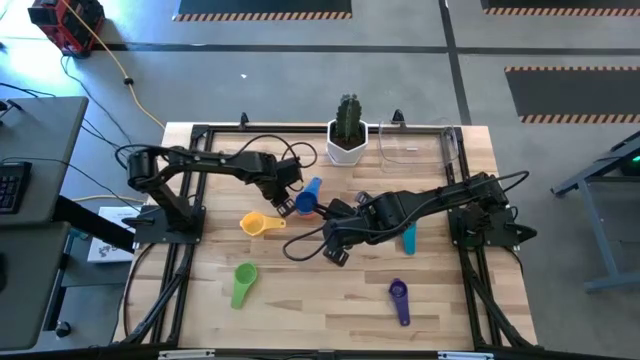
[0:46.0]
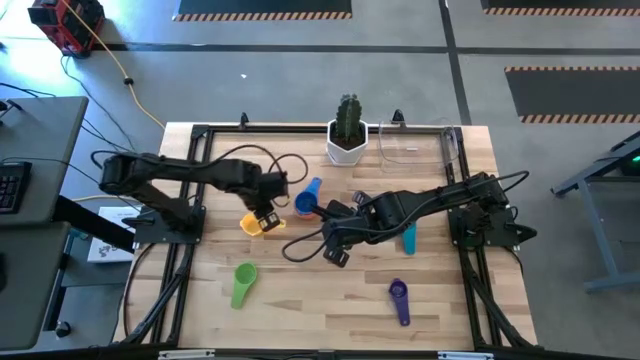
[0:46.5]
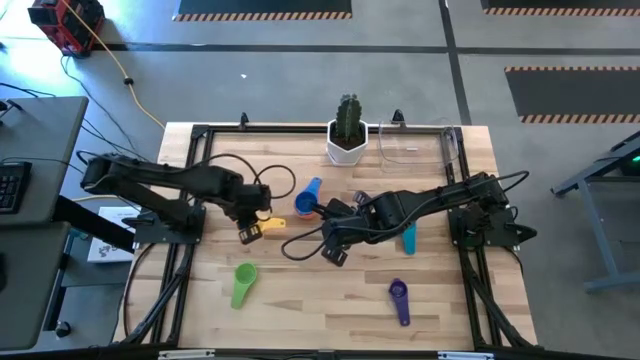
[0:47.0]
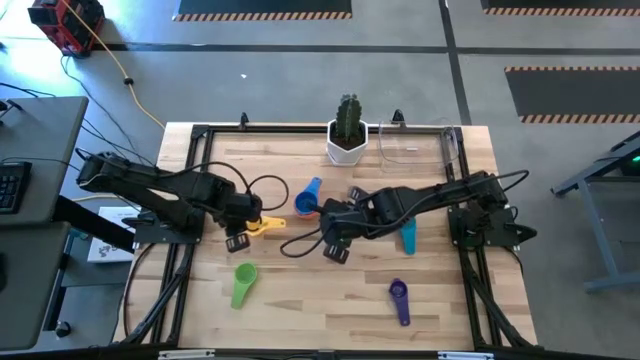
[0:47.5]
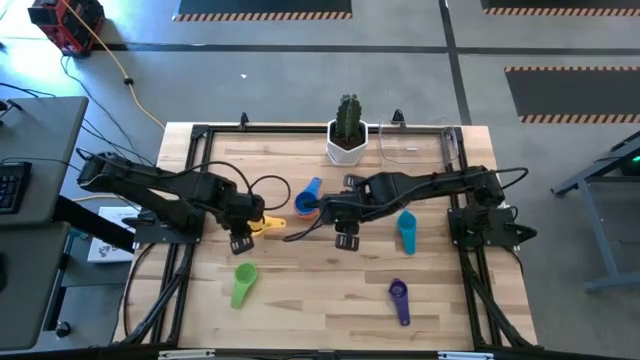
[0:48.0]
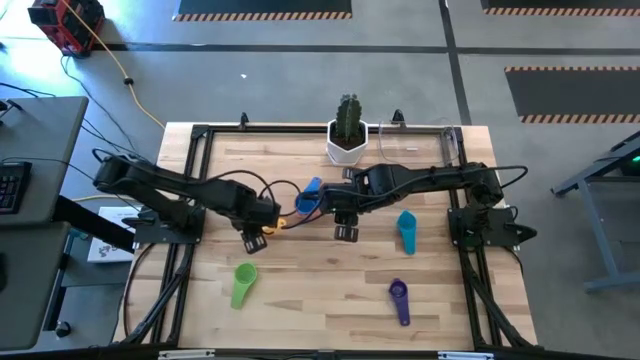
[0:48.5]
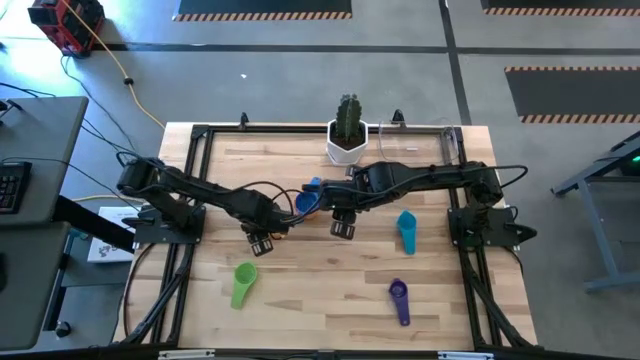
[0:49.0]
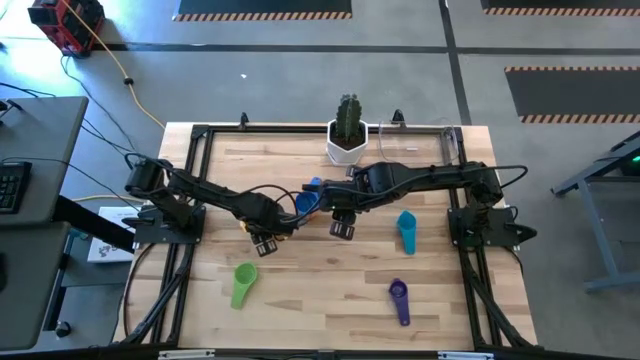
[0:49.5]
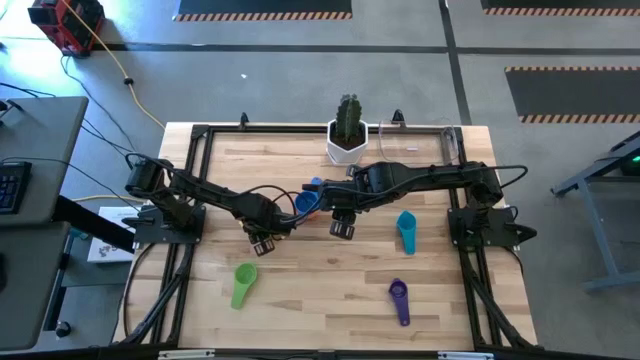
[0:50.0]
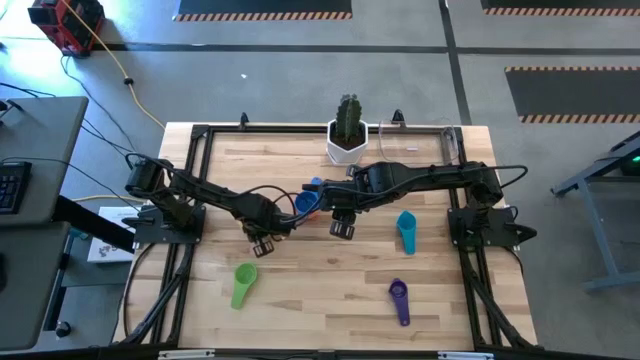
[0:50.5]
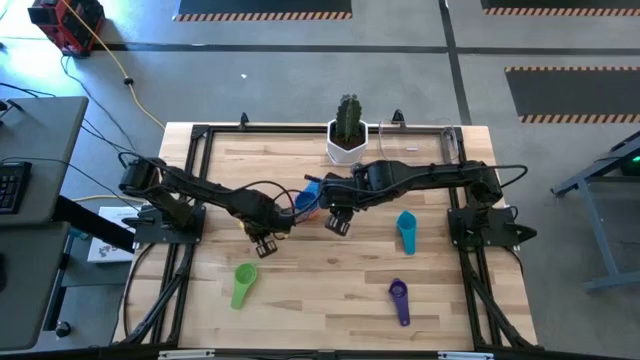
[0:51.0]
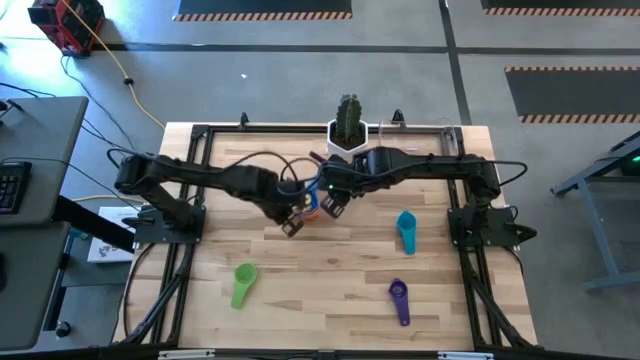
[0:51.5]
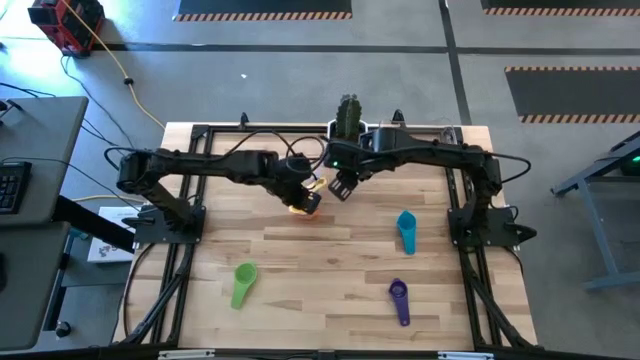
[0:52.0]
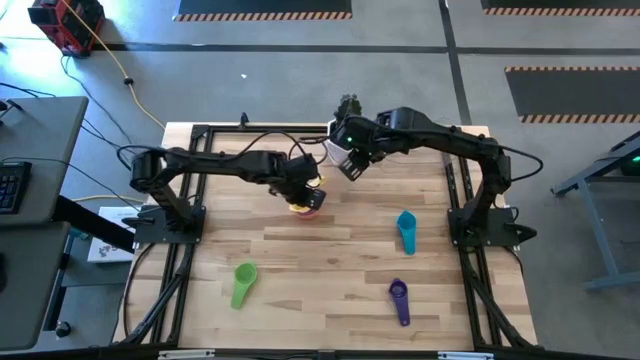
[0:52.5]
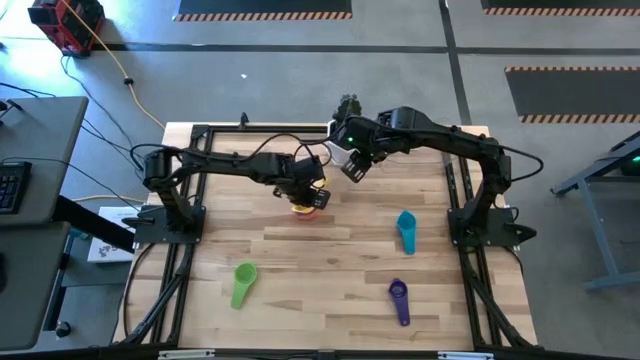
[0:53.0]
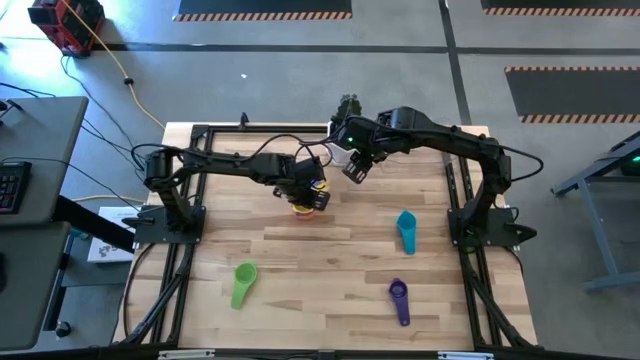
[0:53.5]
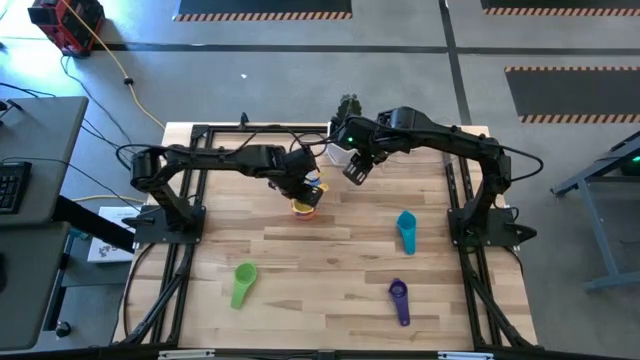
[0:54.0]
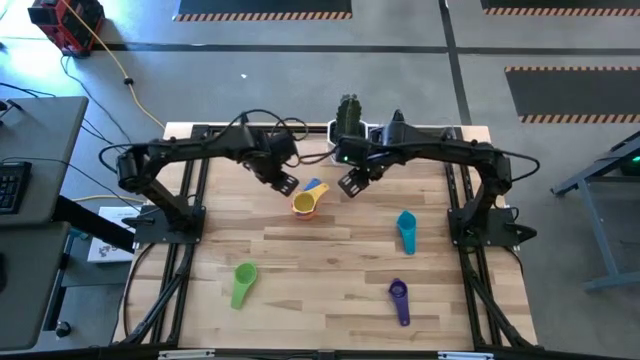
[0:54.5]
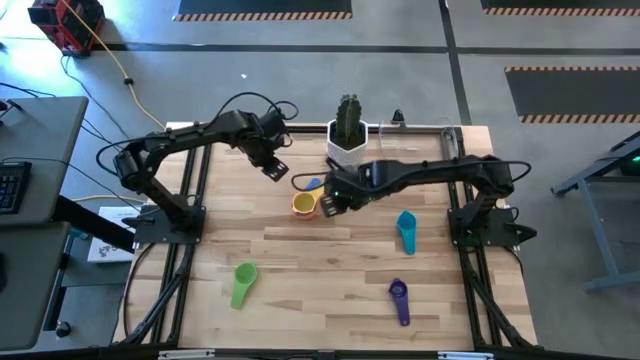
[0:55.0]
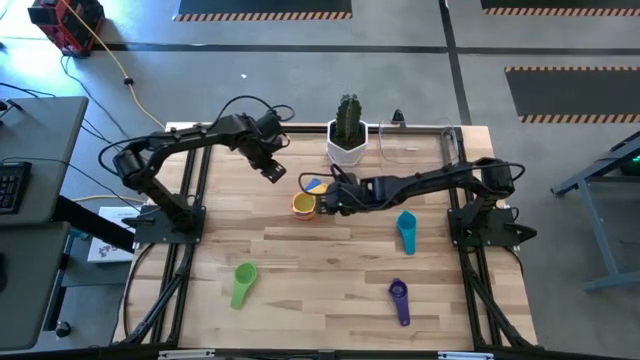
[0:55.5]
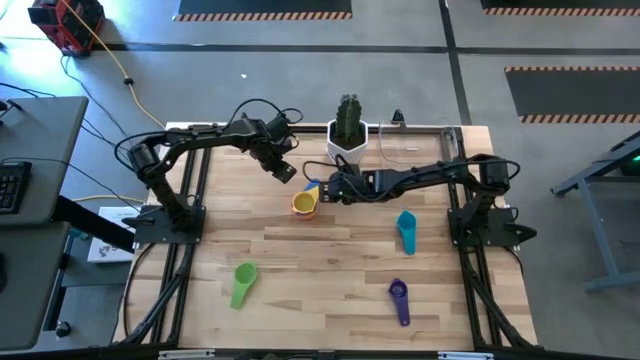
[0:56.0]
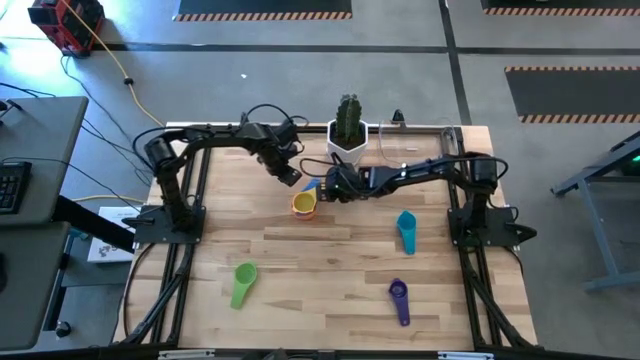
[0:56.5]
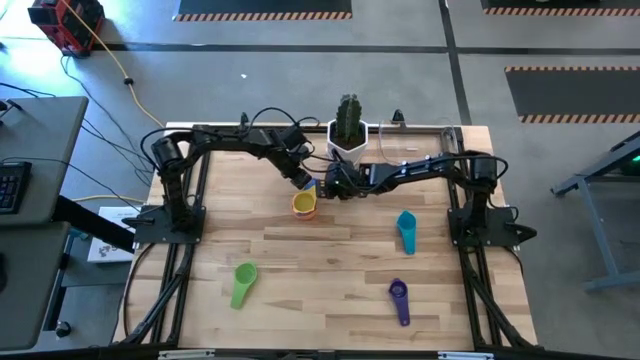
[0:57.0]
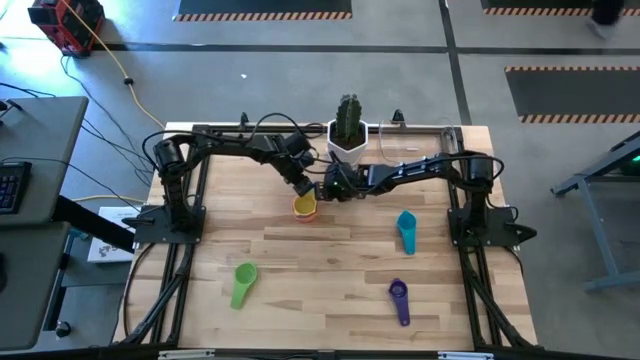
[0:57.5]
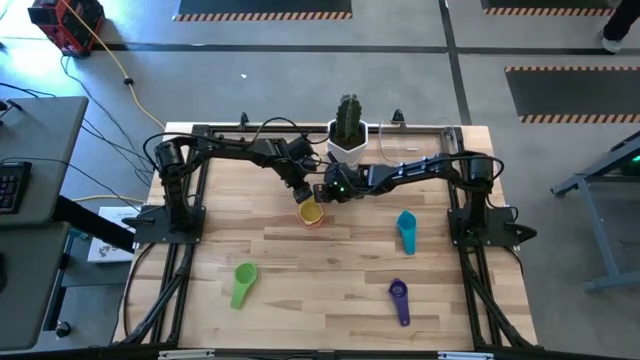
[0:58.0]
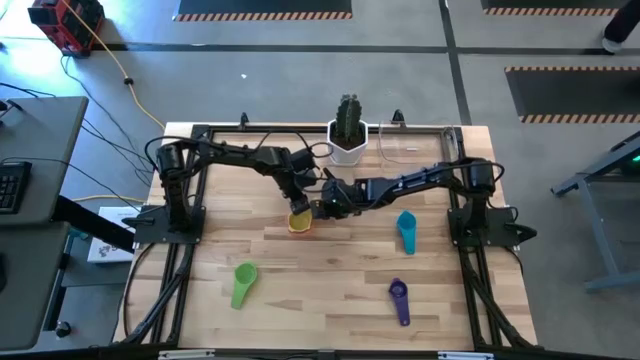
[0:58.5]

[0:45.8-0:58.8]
Task: Nest measuring cups in basket
Stack the yellow measuring cup on top of the blue measuring cup

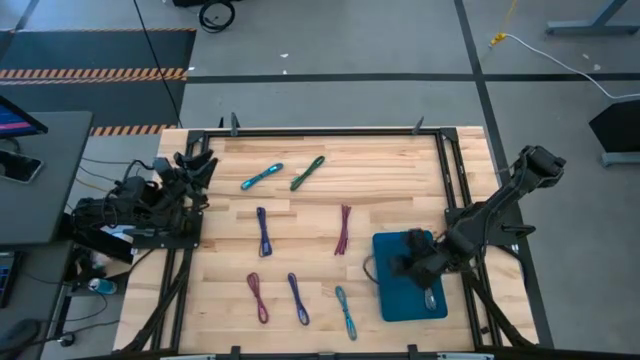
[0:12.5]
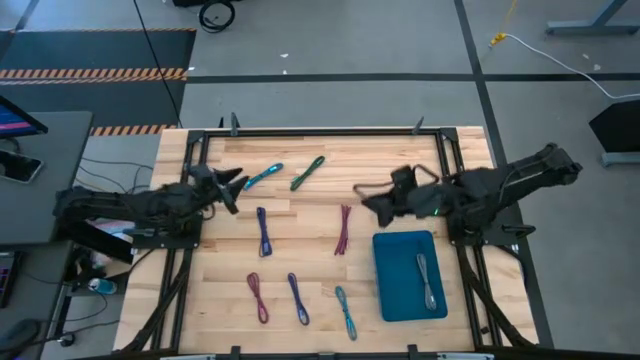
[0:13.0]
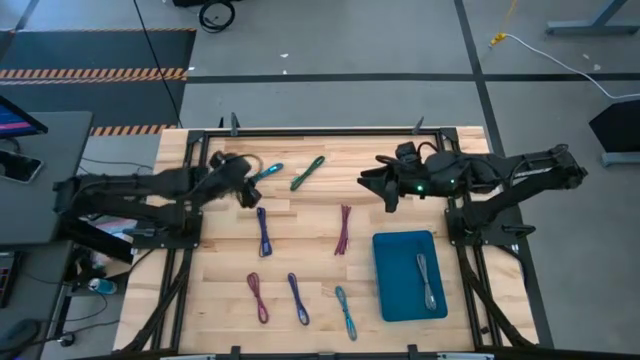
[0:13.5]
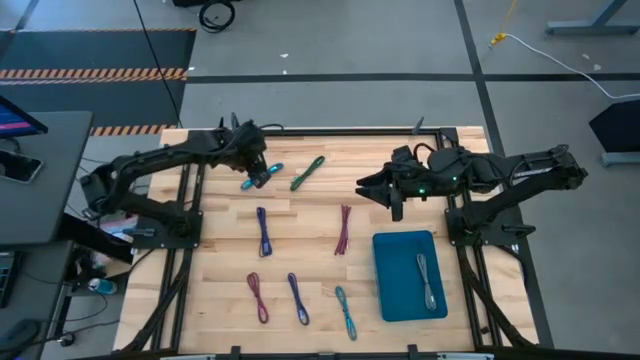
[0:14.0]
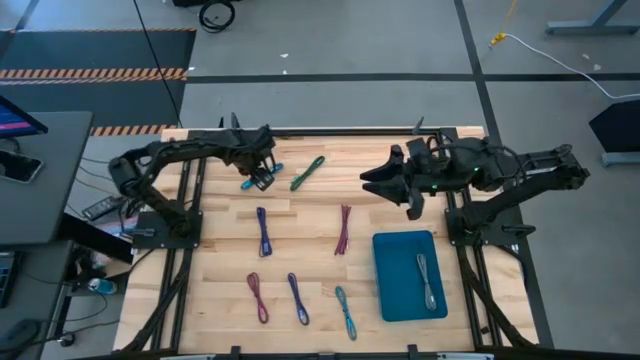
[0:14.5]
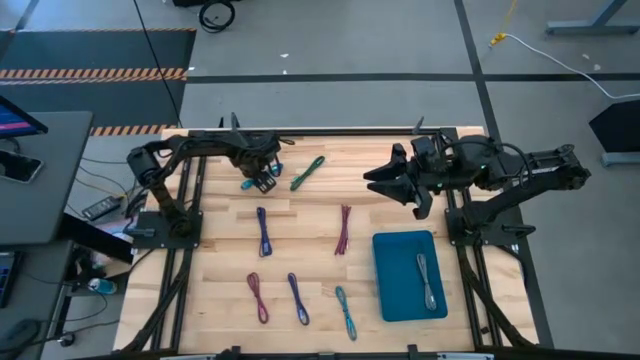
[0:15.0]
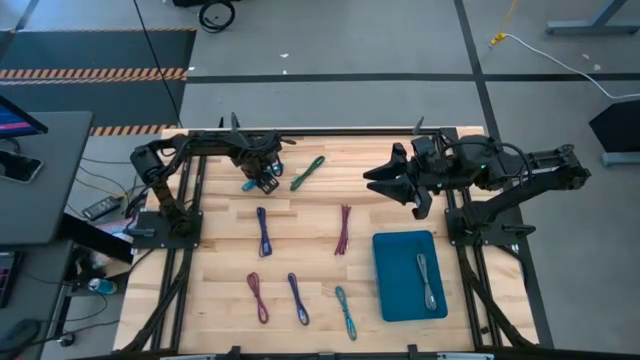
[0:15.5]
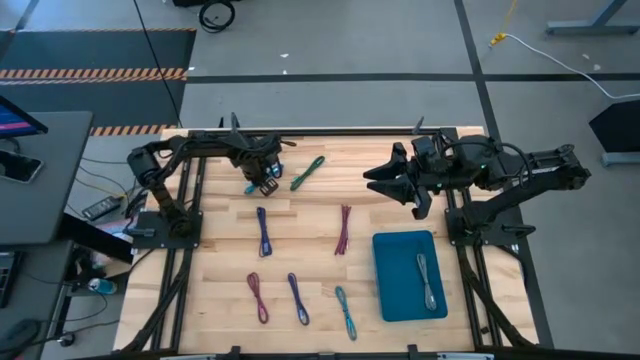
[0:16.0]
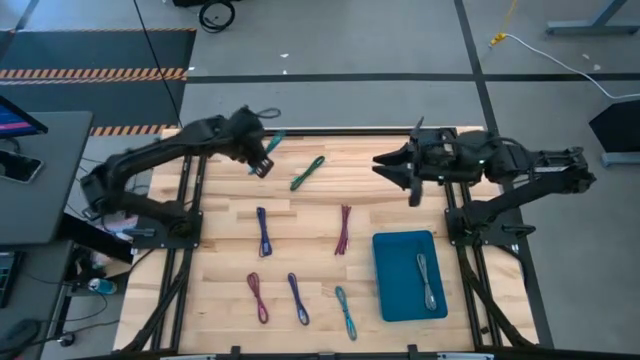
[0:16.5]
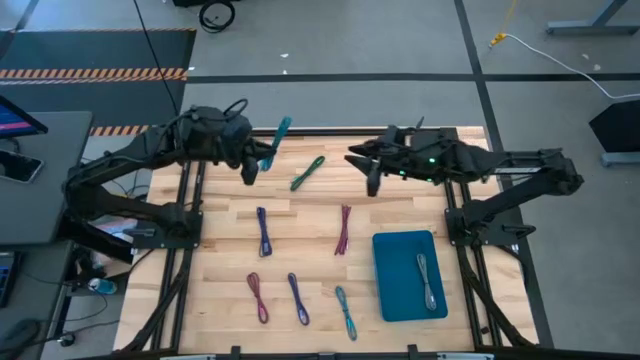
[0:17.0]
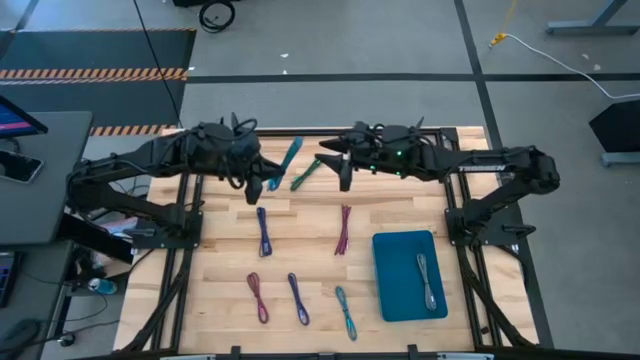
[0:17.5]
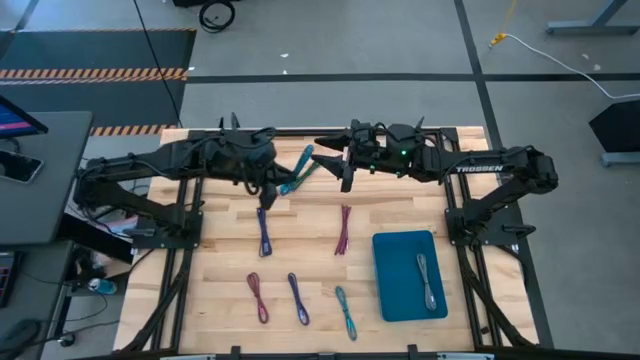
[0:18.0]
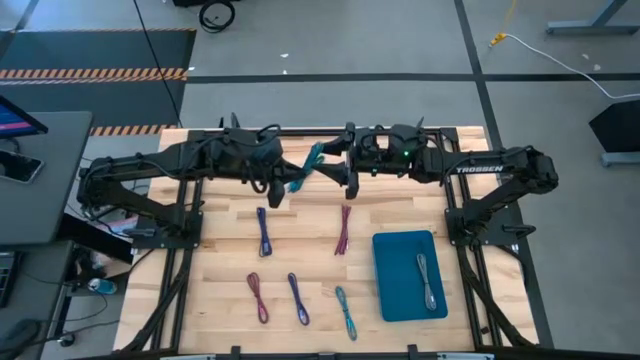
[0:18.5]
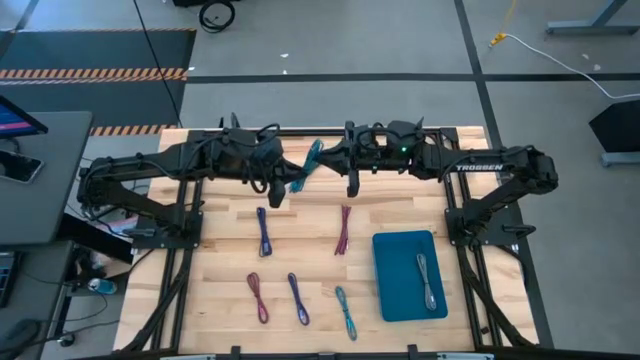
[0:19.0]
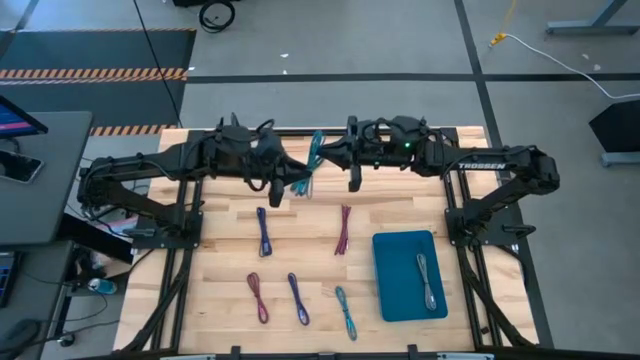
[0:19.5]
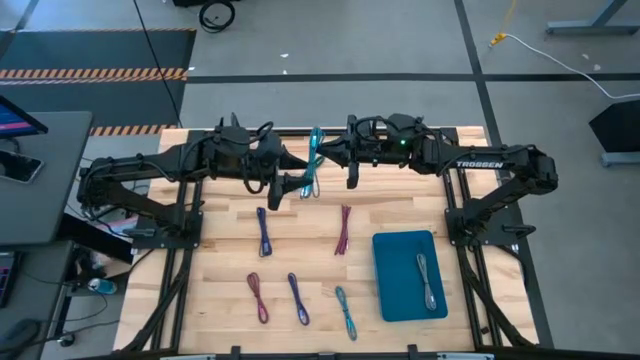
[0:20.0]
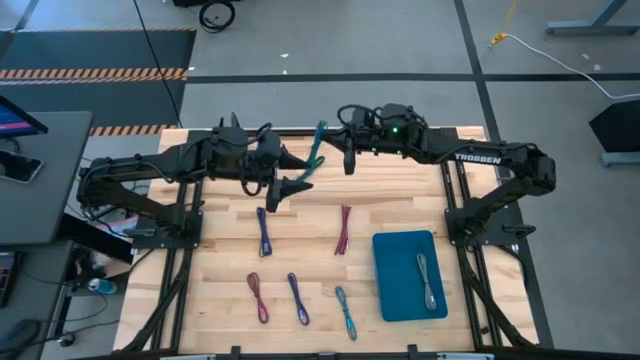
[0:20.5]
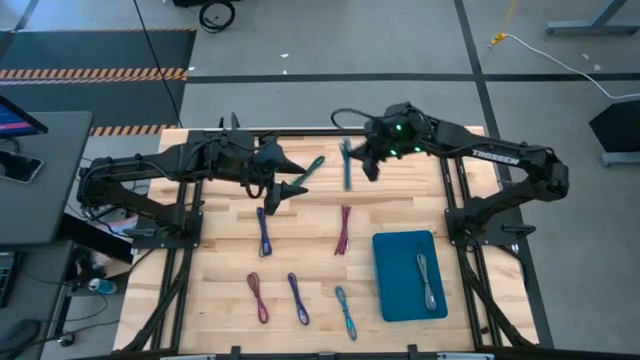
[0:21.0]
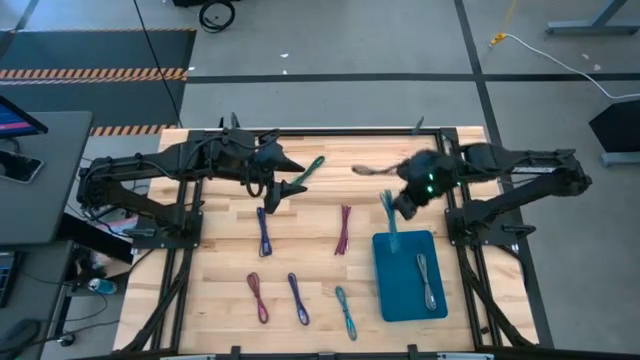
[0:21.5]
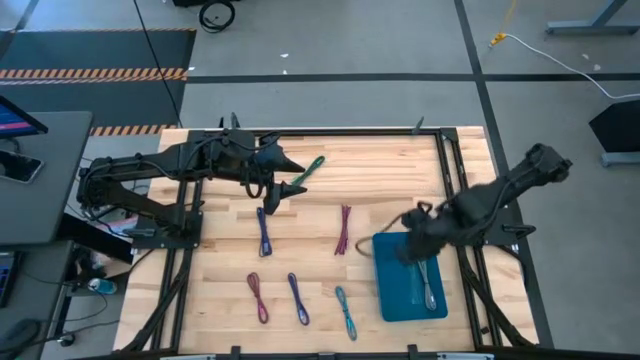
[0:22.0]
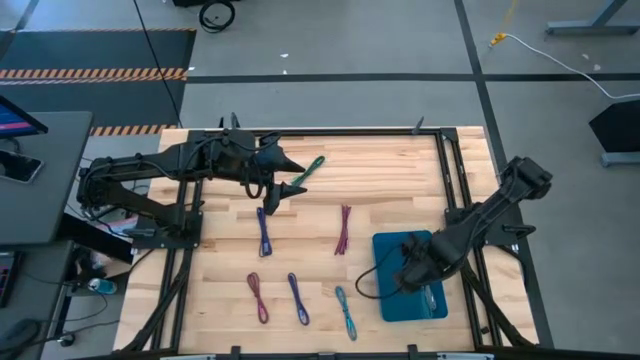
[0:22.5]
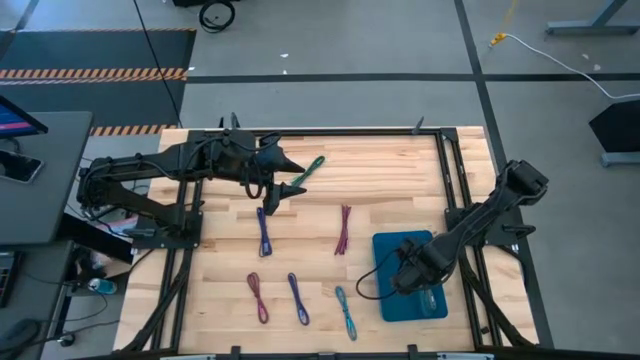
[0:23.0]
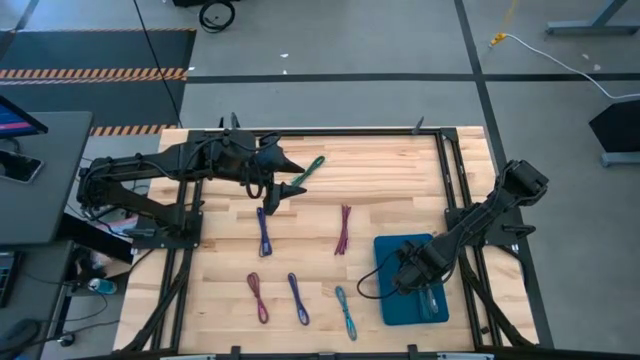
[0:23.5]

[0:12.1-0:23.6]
Task: Pick and place USB-C Cables
Put the top blue charger cable into the blue bin
